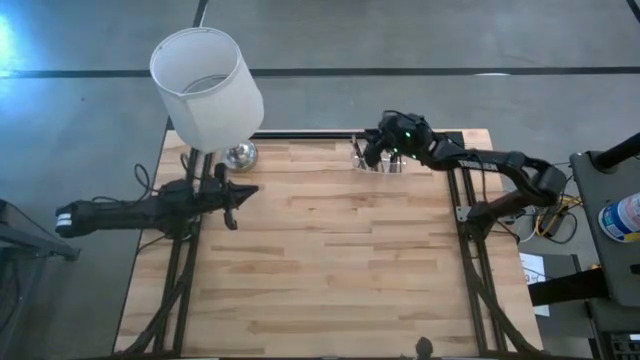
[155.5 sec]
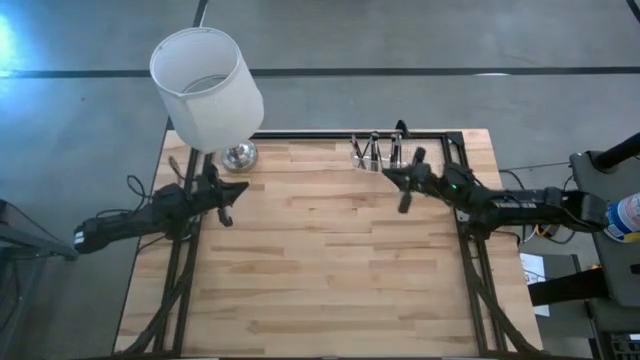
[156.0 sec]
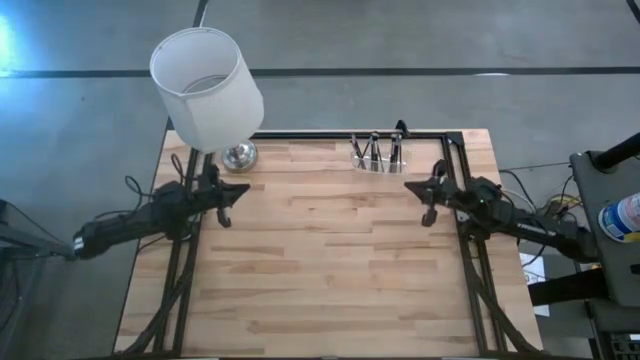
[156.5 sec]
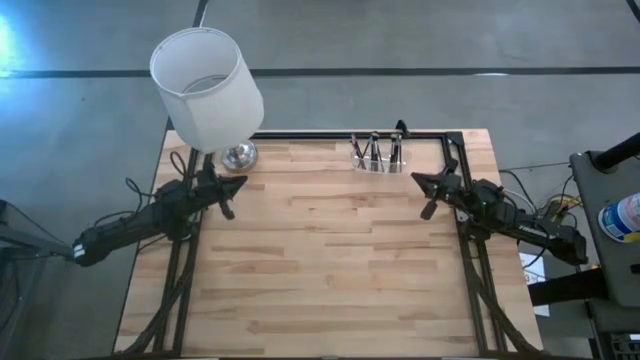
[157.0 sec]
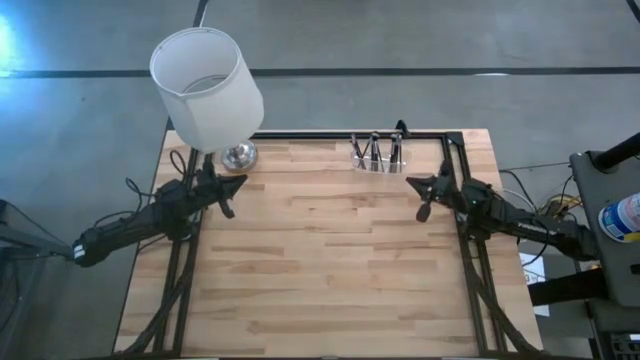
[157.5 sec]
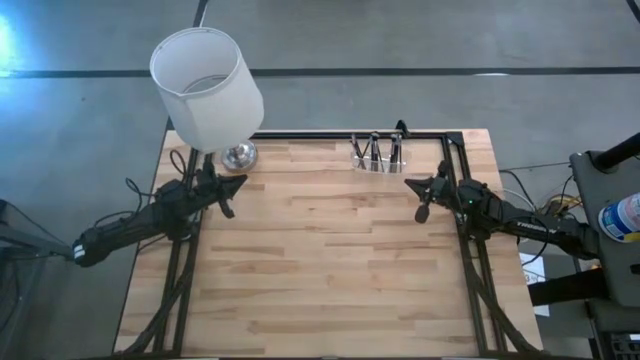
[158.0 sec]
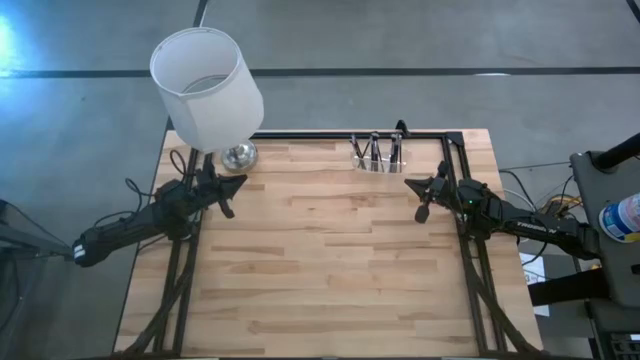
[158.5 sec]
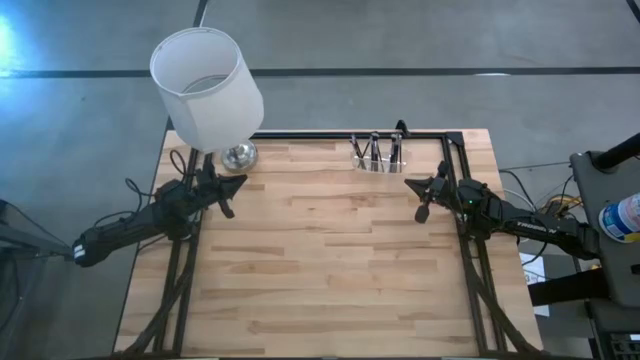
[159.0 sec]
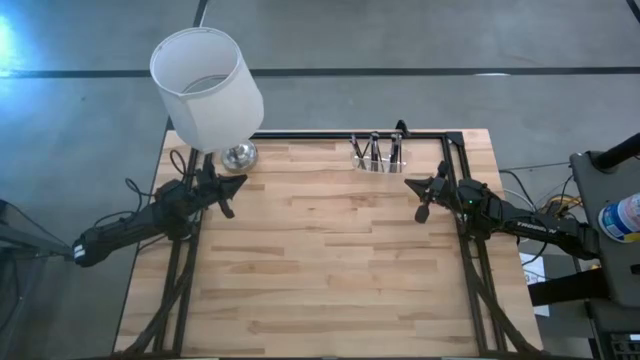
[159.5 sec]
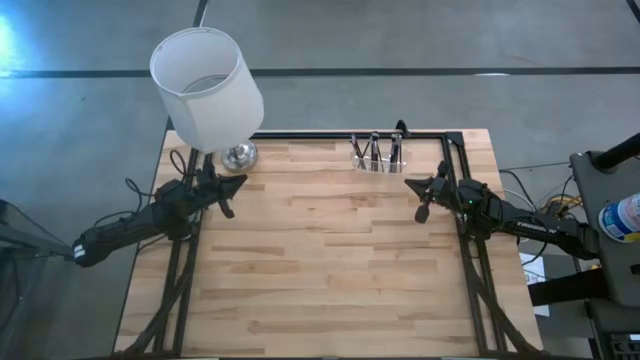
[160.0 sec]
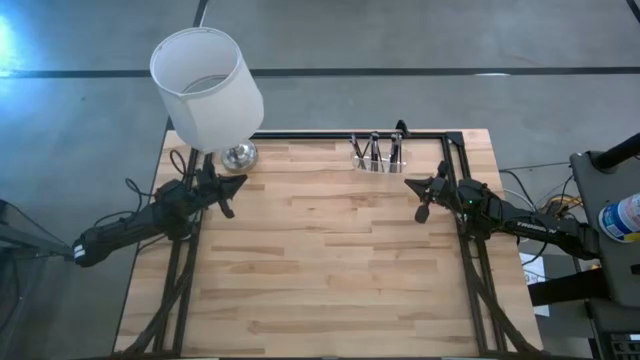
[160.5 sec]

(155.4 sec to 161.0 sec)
Task: Put items in baskets/containers
Return to Home Position

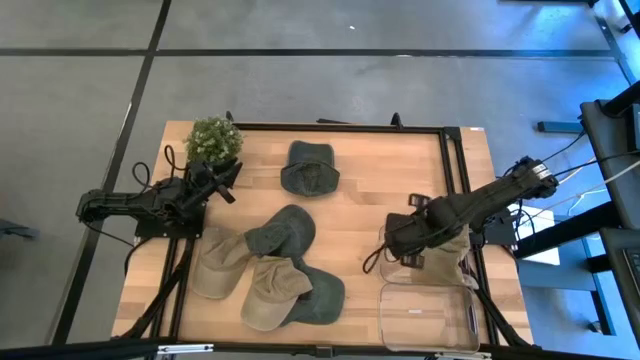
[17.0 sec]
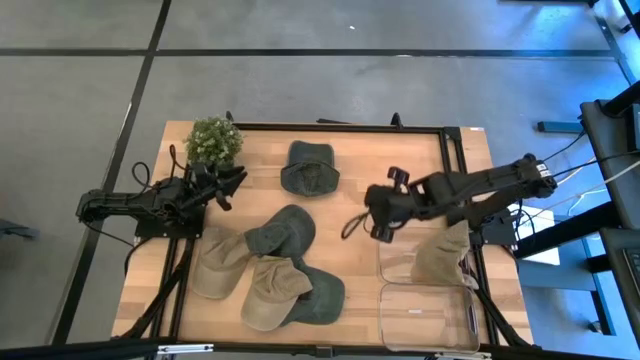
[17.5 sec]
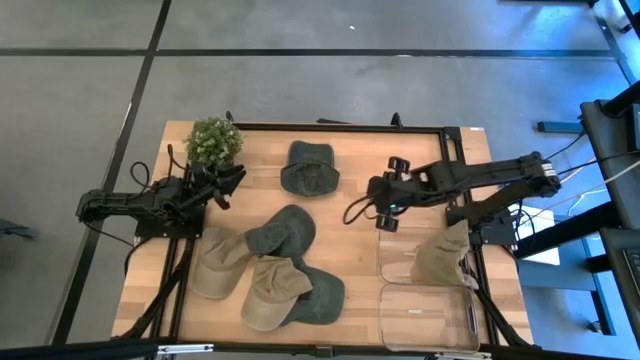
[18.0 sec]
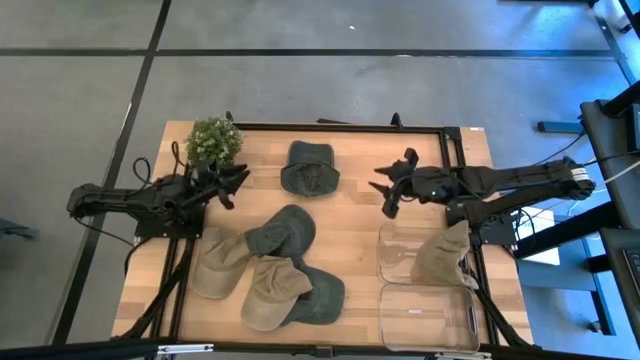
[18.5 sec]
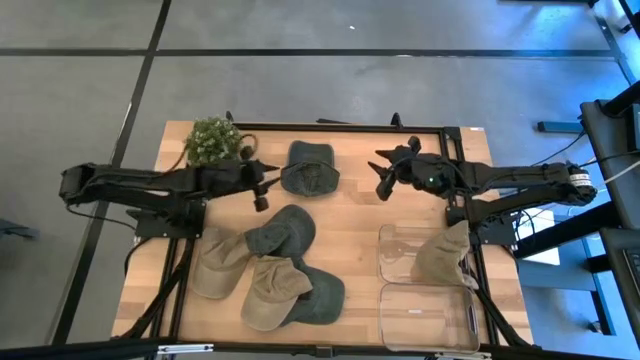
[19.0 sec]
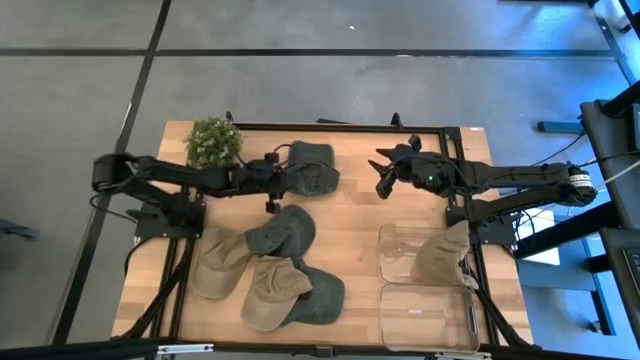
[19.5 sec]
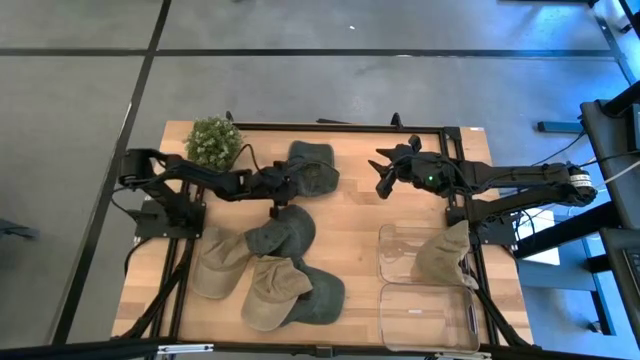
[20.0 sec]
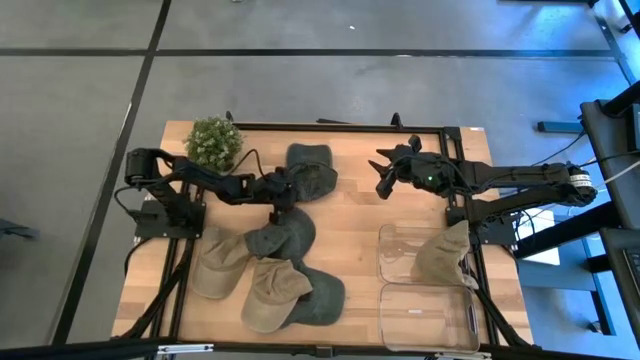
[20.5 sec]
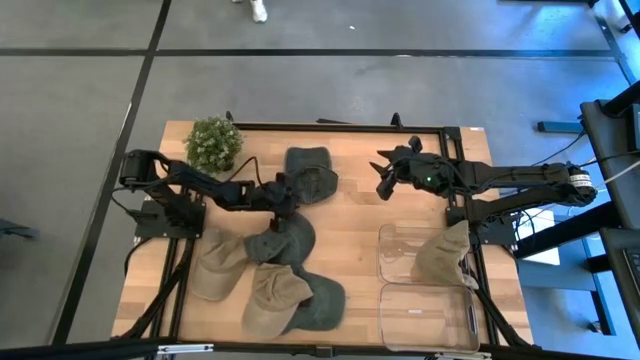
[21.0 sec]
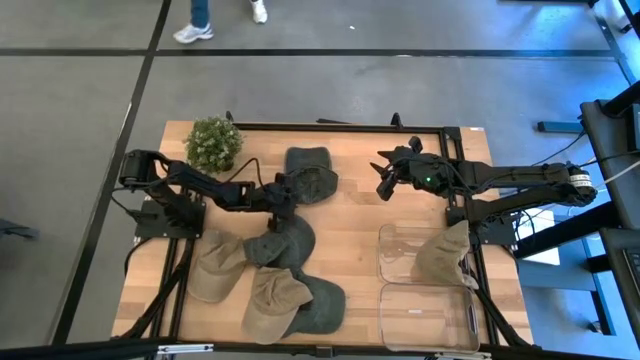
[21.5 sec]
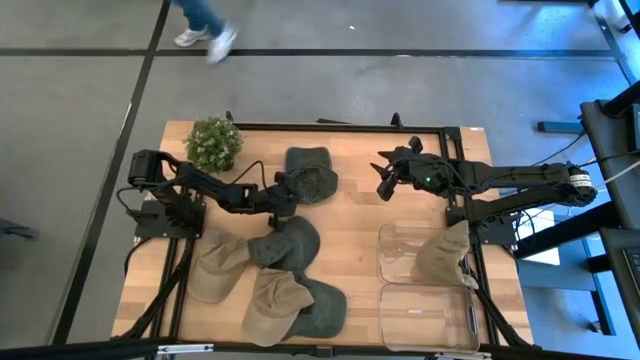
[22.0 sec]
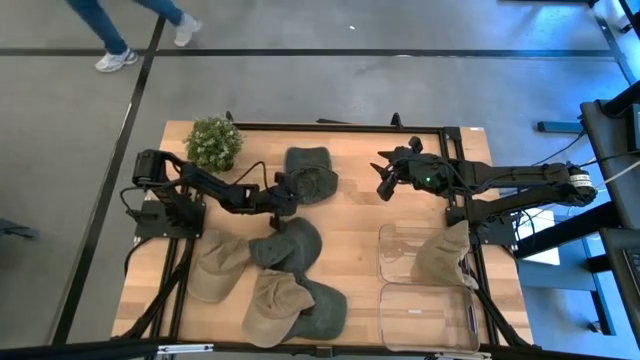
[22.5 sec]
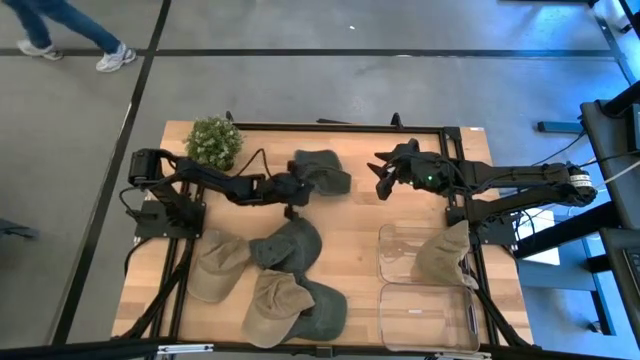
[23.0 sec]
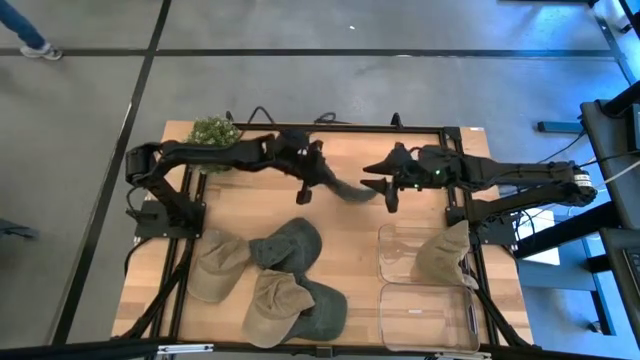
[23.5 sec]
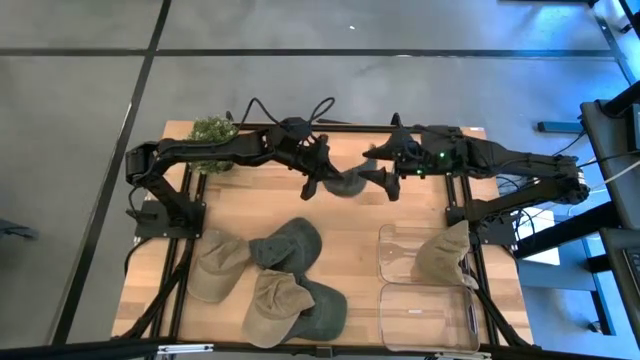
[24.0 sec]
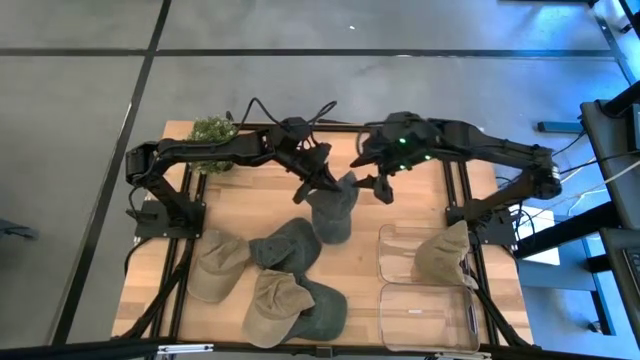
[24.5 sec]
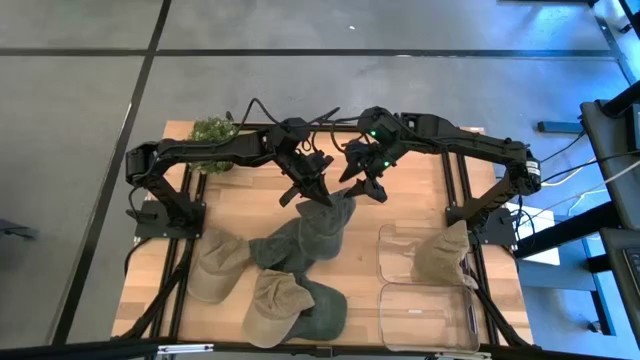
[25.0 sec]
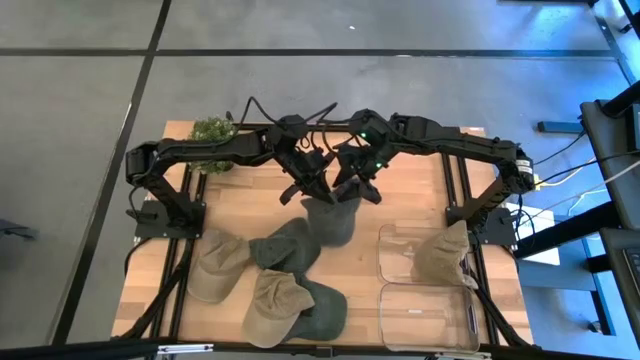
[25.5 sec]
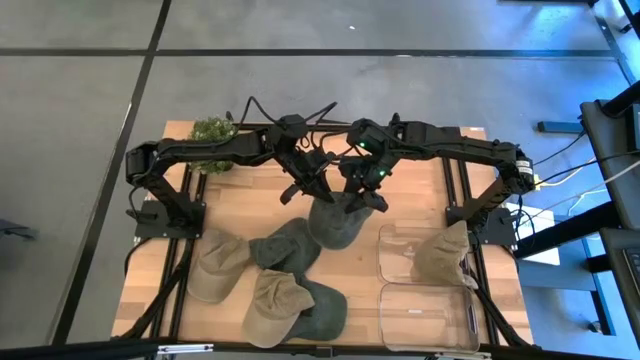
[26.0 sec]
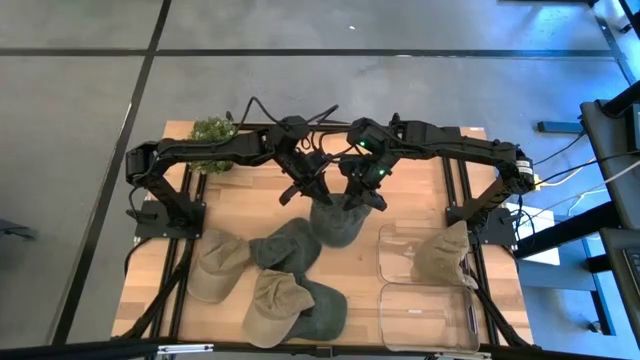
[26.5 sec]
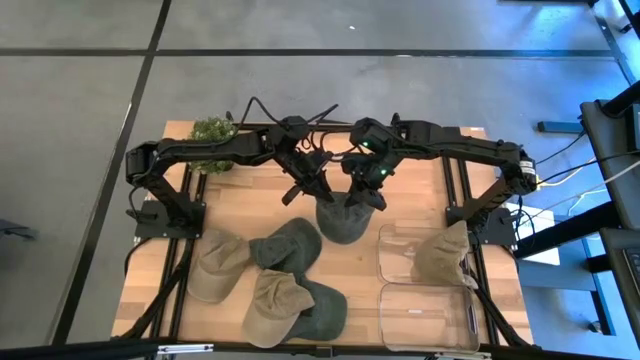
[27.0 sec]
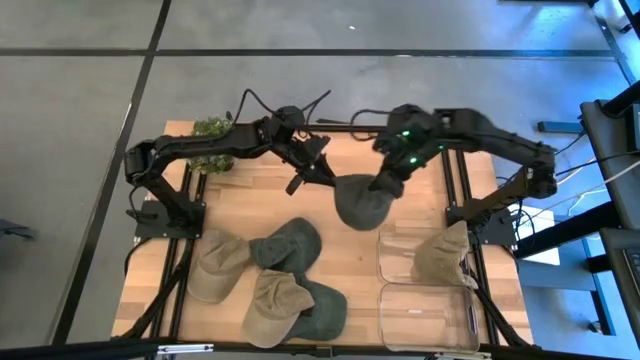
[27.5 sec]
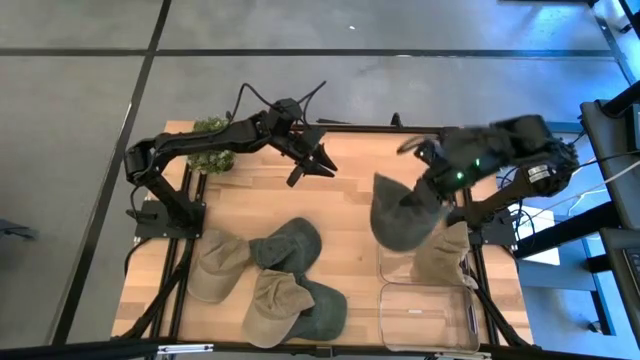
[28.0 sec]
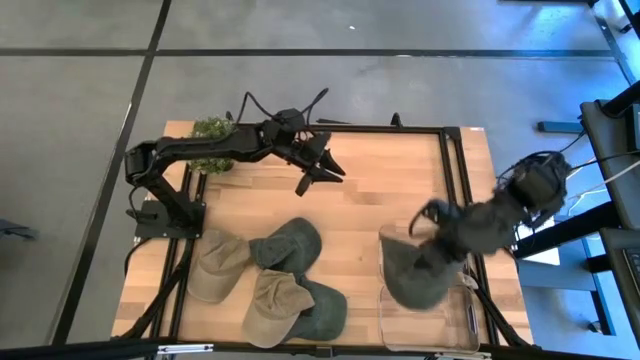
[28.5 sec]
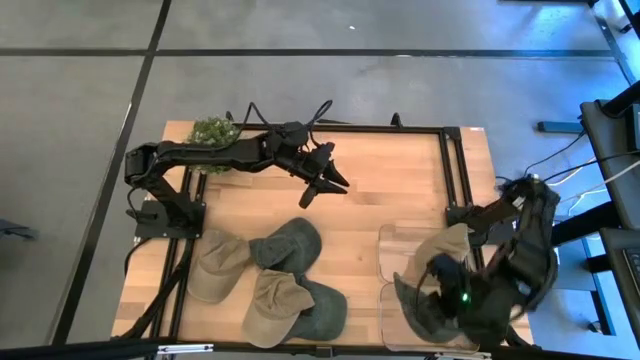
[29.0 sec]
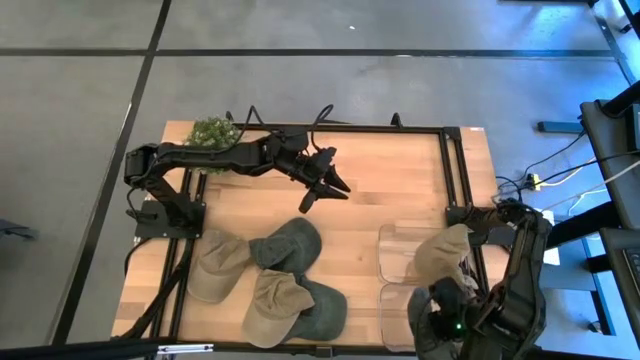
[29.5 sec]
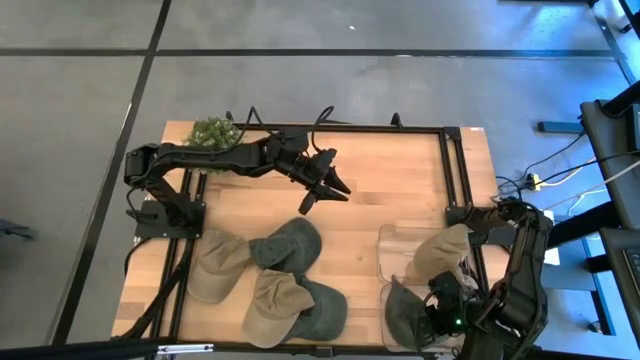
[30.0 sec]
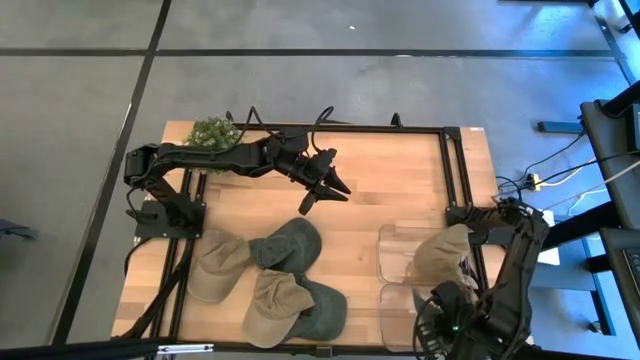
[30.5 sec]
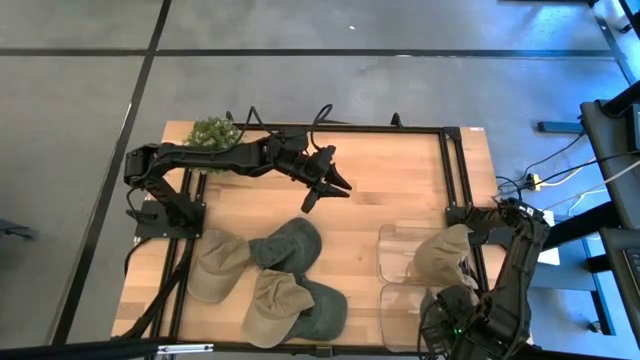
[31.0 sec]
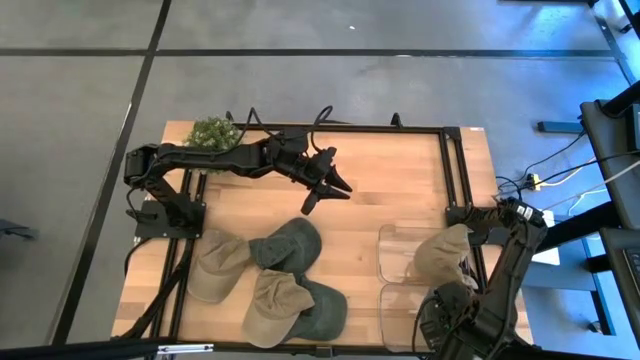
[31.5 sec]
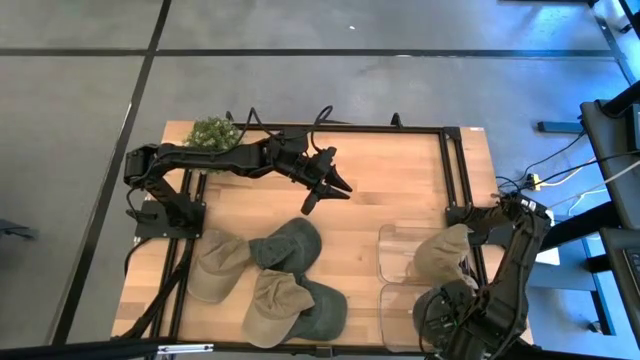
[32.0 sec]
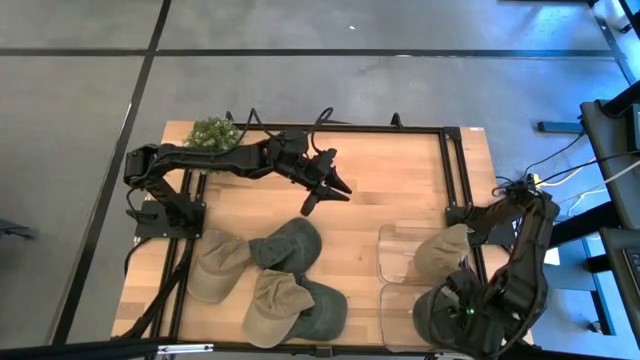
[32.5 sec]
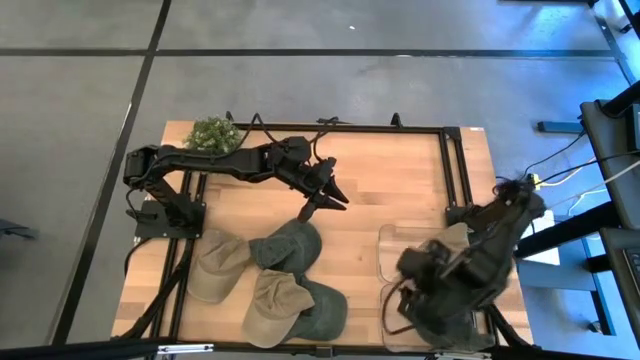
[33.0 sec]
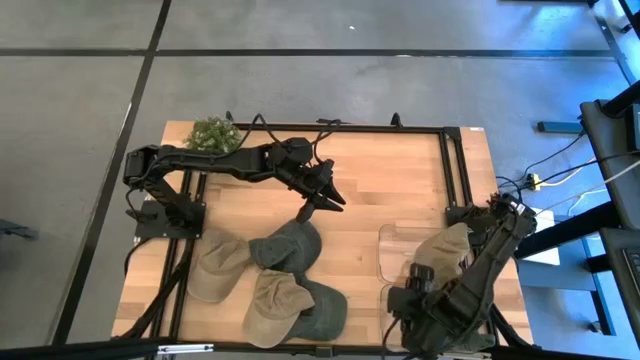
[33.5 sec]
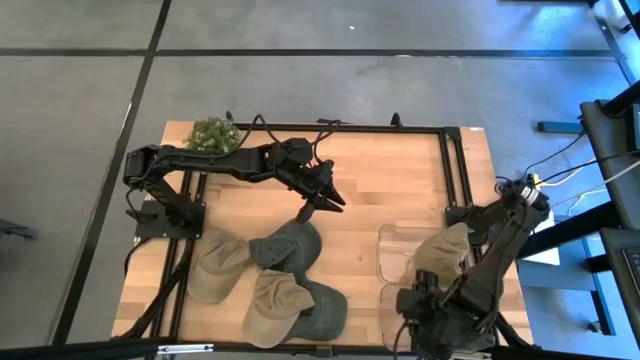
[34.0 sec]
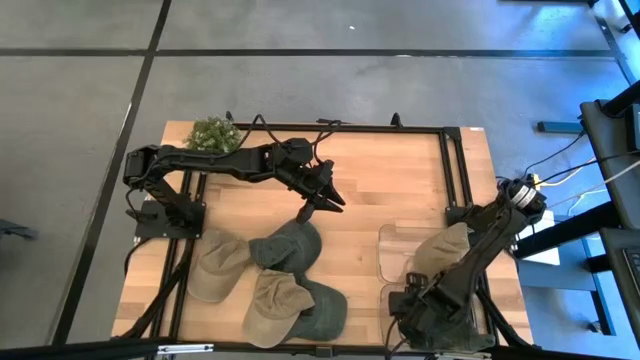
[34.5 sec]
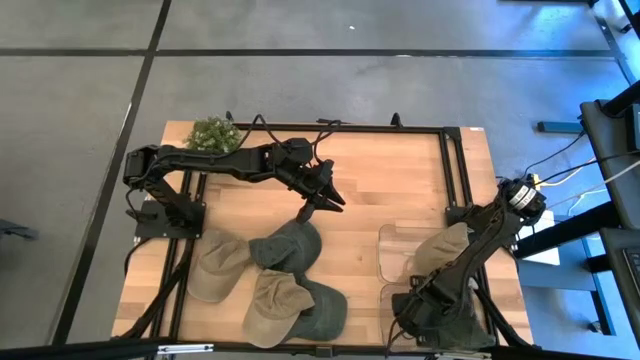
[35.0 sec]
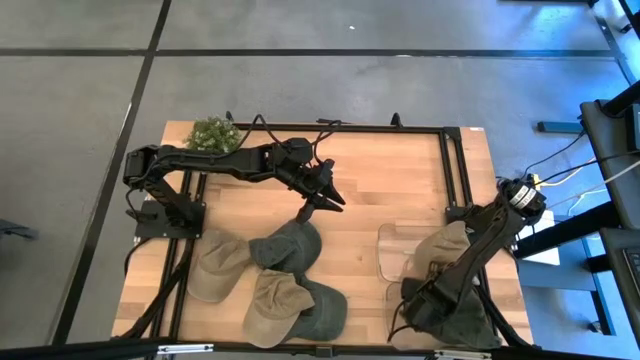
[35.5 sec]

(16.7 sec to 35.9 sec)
Task: Pick & Place hat
Put the top black cap into the bottom transparent bin
